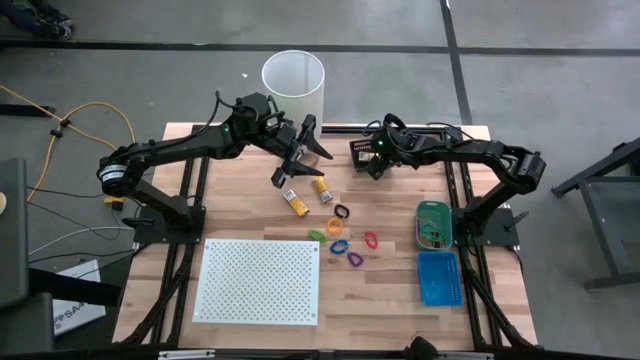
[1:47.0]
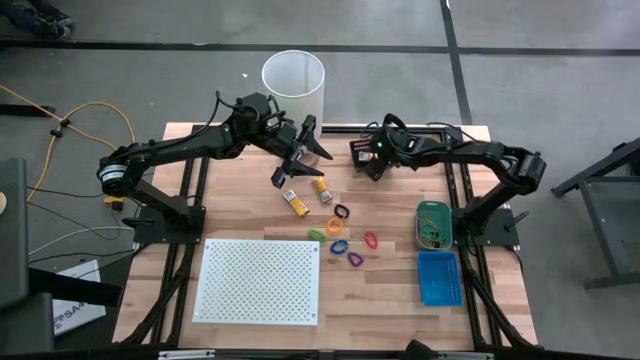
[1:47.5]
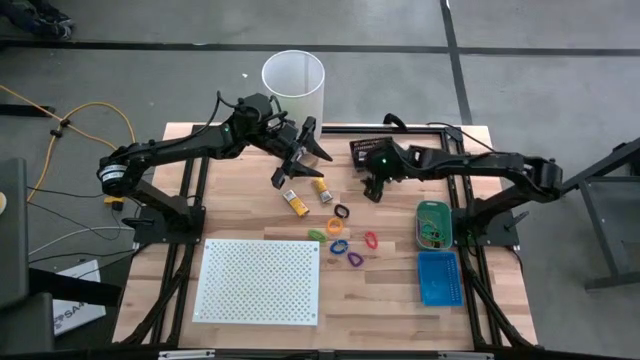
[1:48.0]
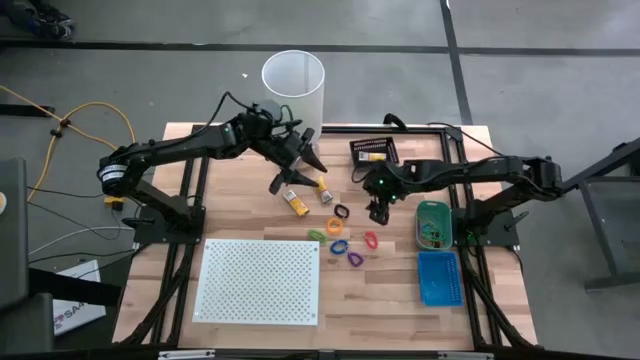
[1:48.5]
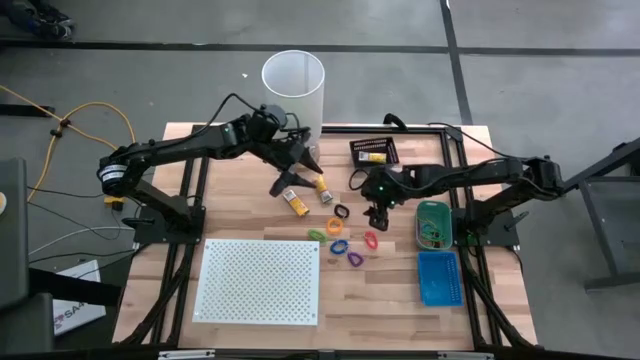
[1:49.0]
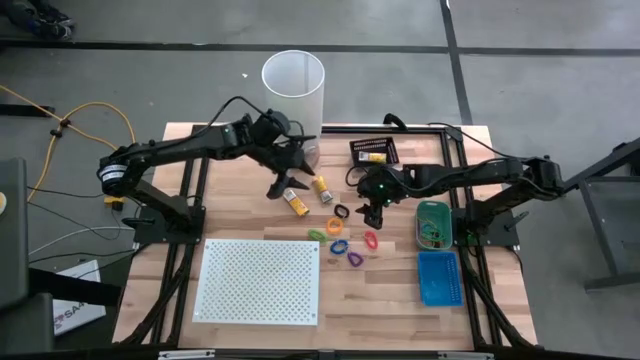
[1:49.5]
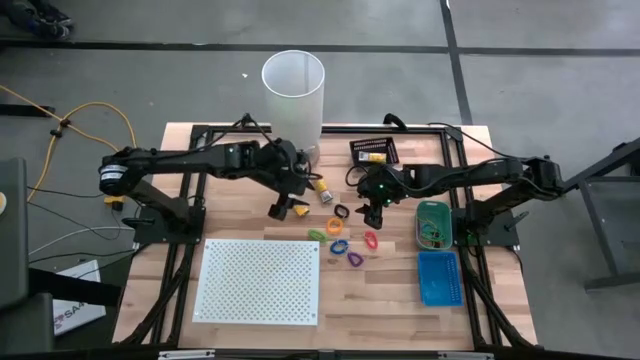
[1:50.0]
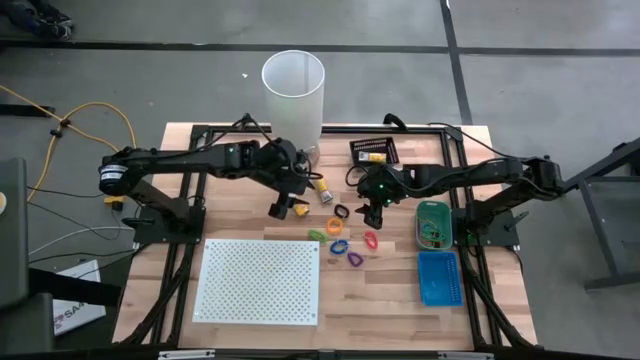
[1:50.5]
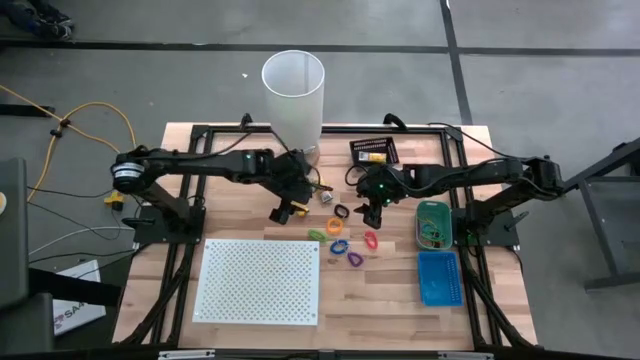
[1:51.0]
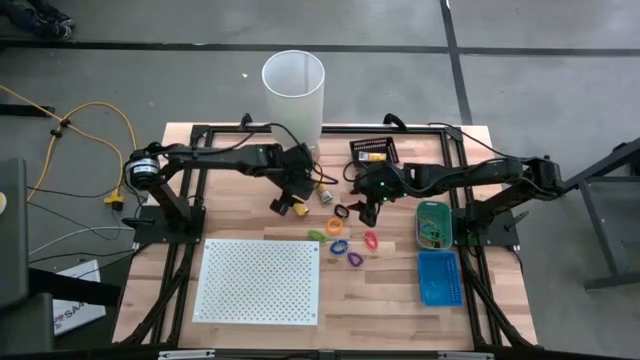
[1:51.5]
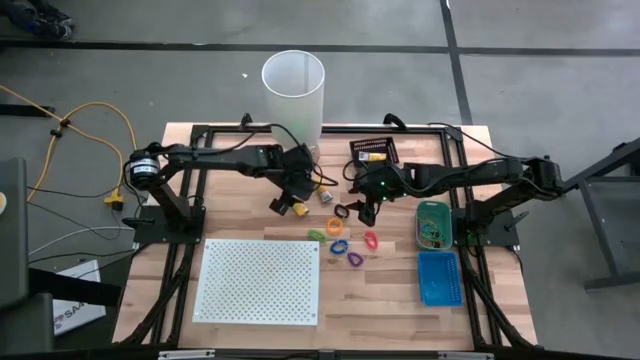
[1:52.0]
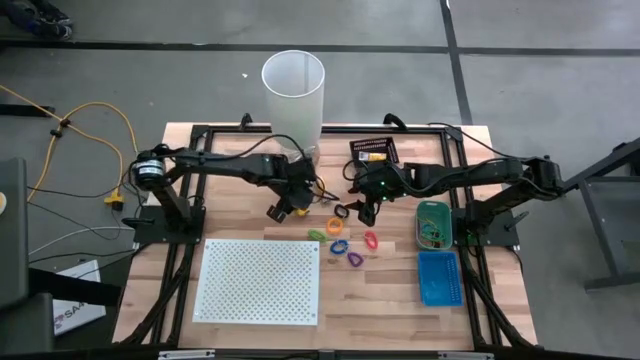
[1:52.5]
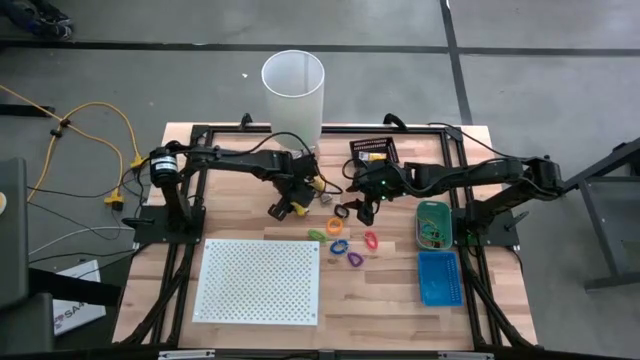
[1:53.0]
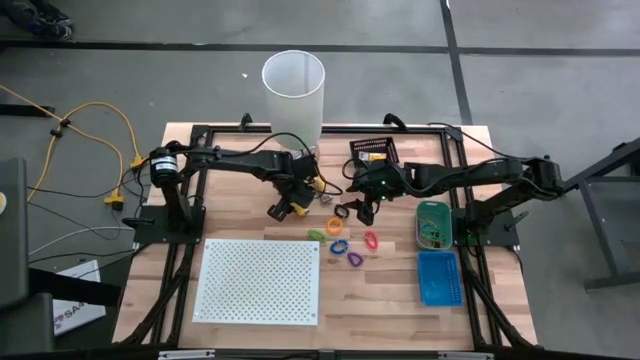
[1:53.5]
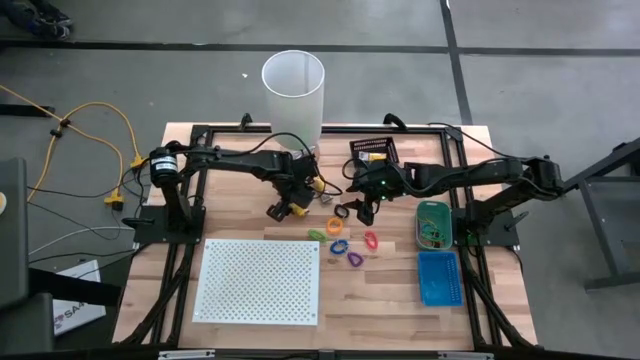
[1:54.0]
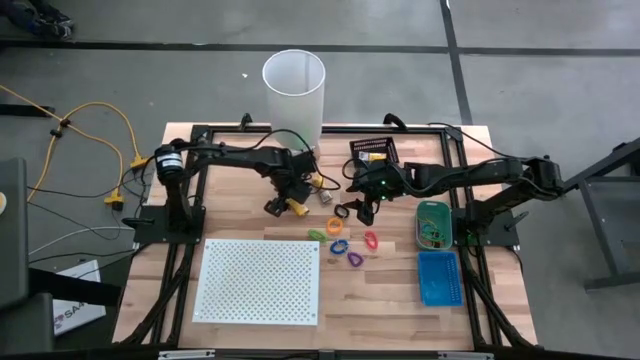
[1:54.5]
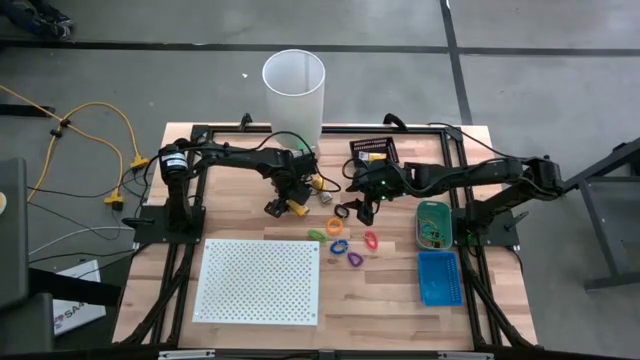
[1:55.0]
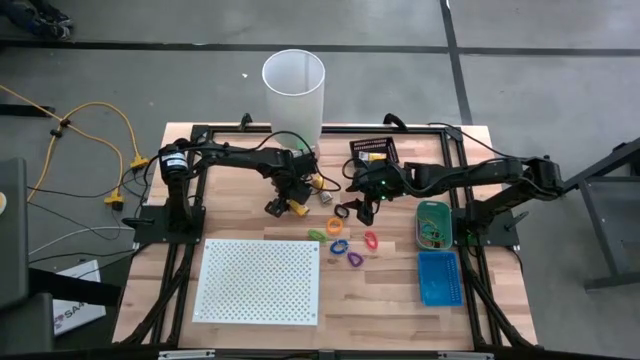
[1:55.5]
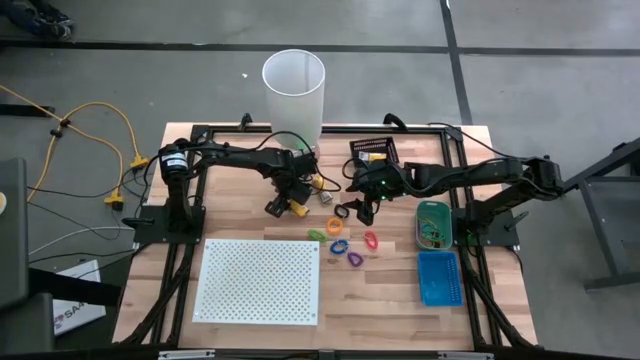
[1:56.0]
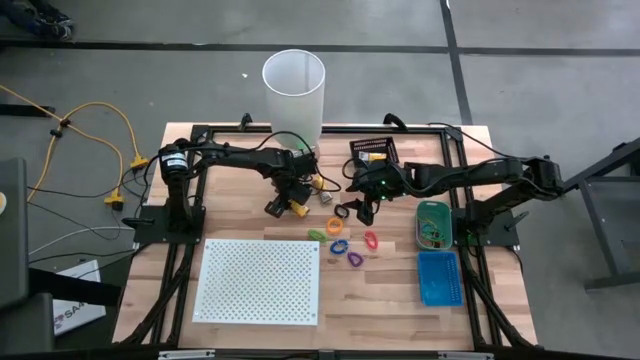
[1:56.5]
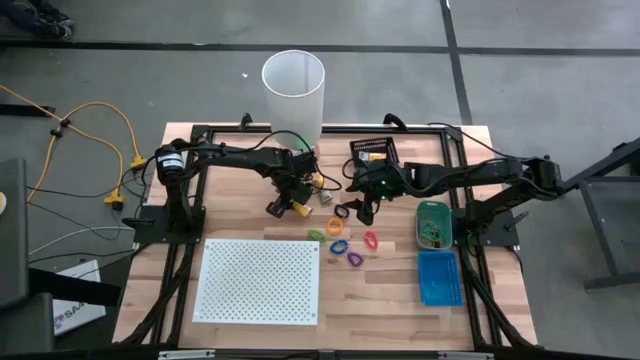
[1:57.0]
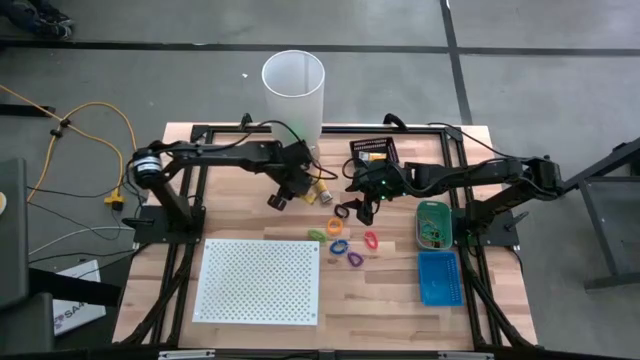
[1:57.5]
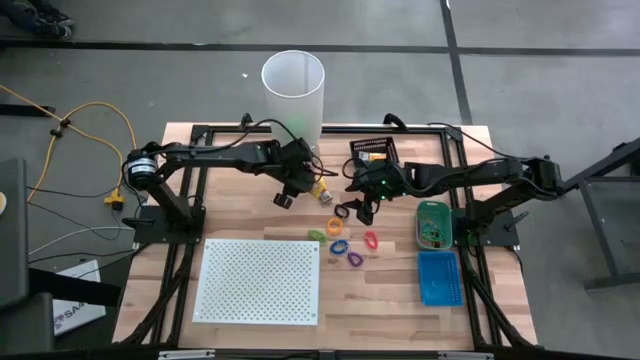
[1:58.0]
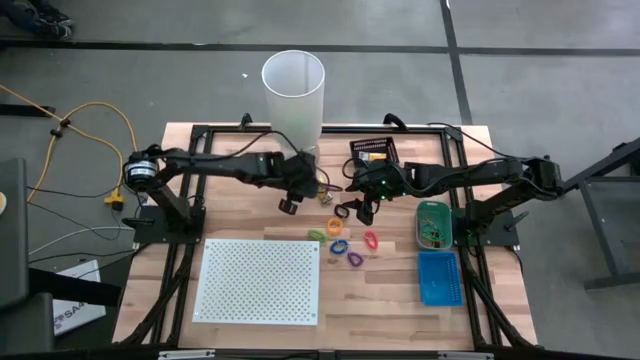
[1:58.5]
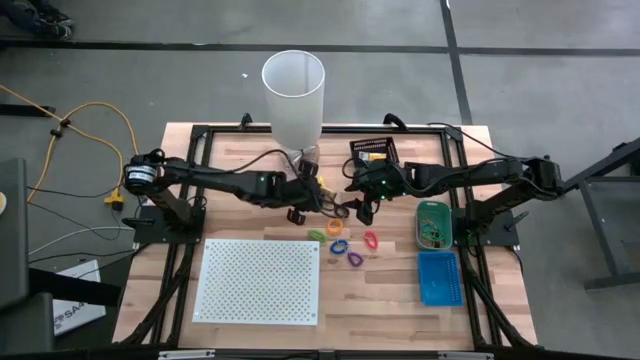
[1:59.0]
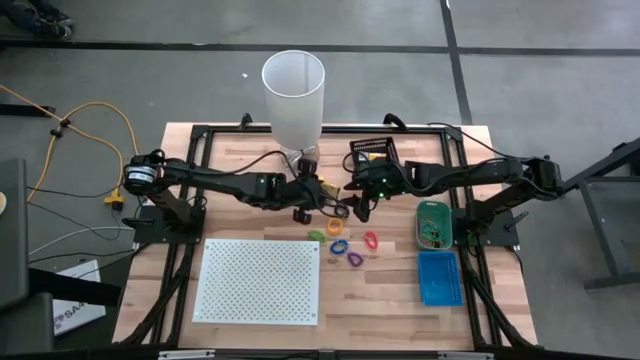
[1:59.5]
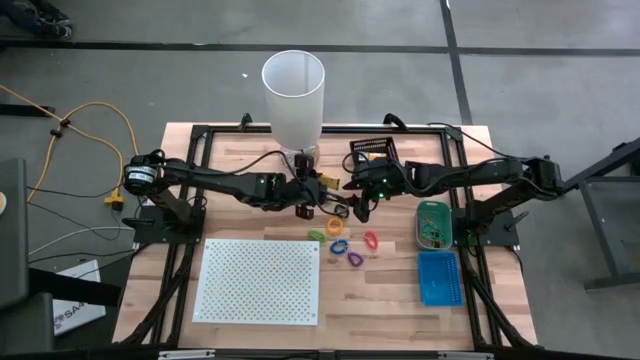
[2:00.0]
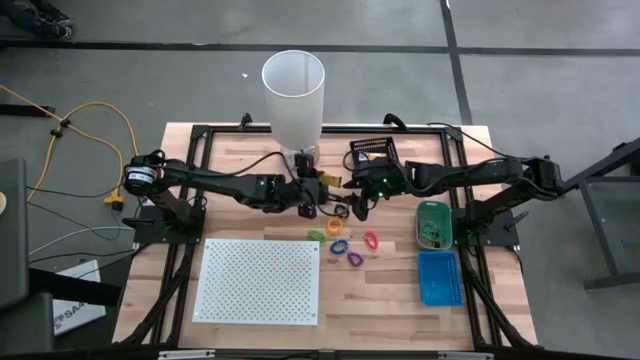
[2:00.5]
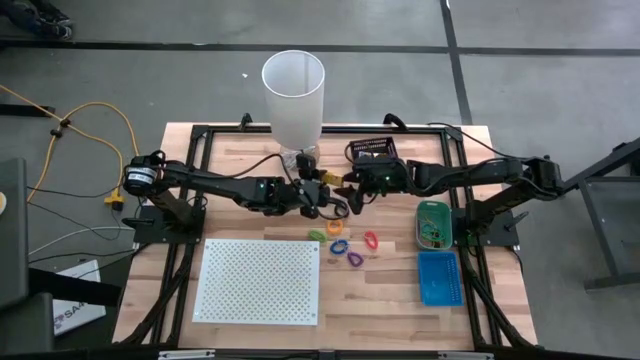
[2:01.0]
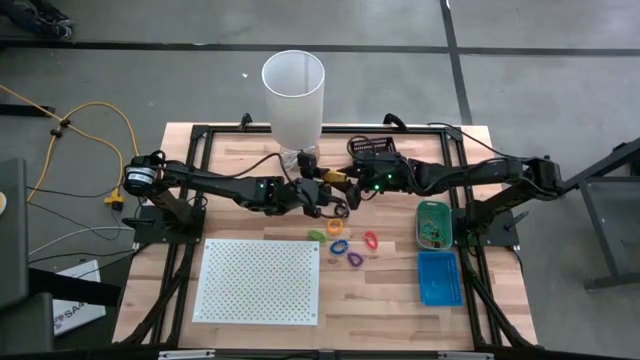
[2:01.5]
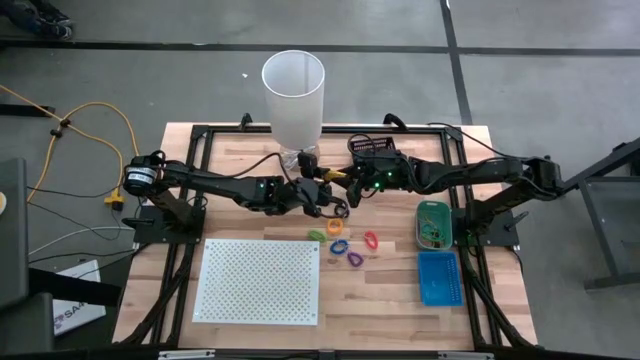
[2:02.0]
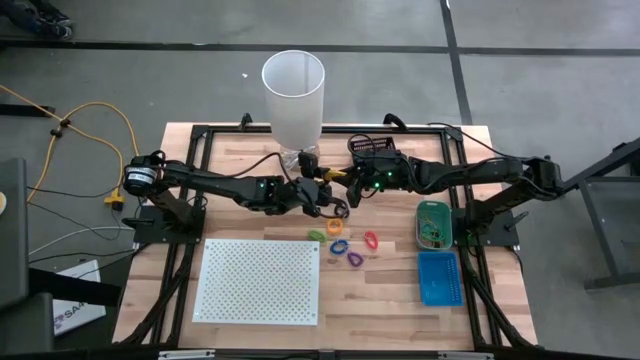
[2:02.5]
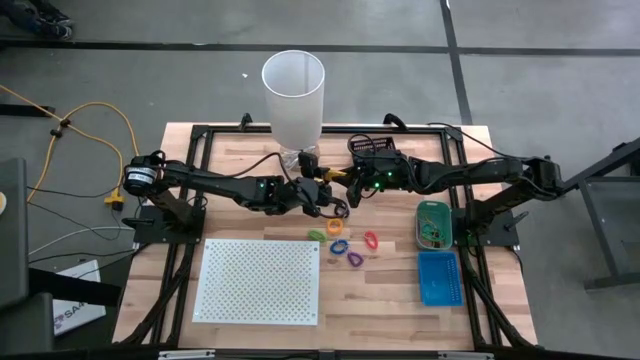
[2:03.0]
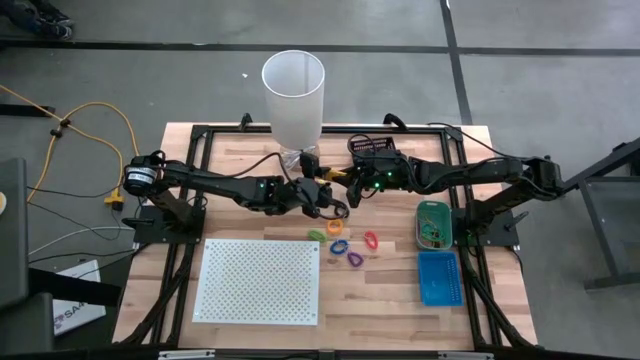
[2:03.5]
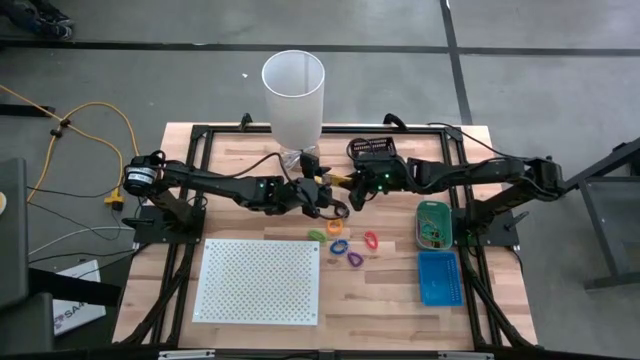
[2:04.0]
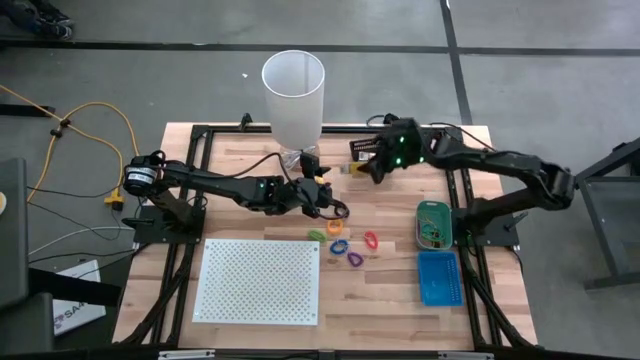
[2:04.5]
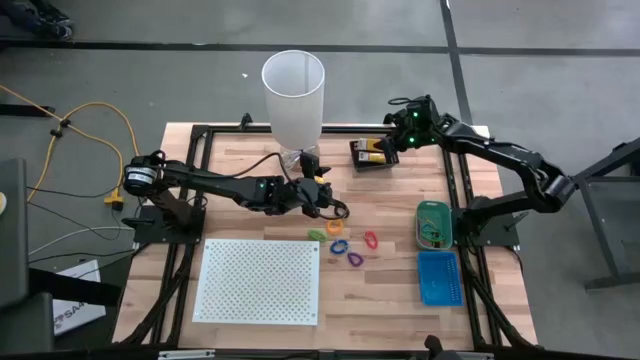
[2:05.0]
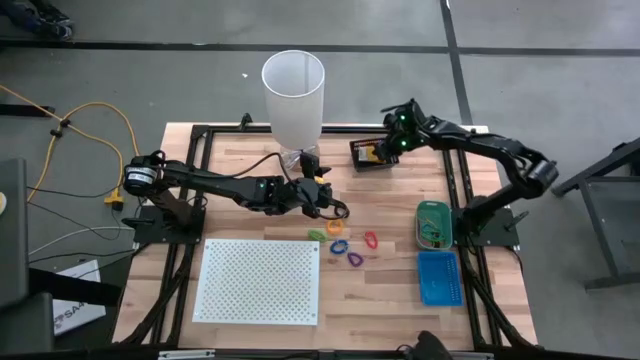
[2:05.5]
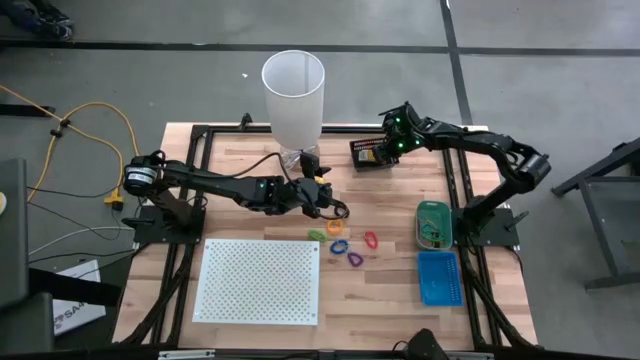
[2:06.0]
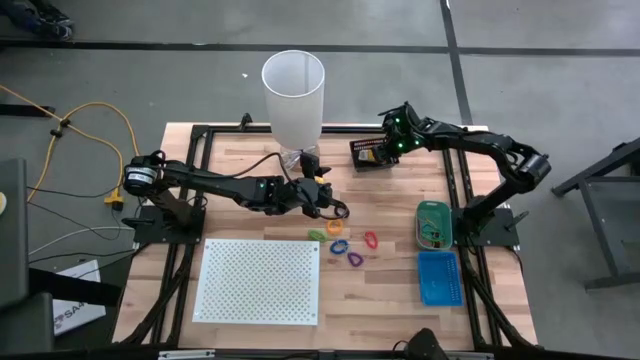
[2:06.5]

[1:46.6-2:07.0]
Task: Pick & Place Office Desk Supplies
Put the left yellow crayon box into the black bin
